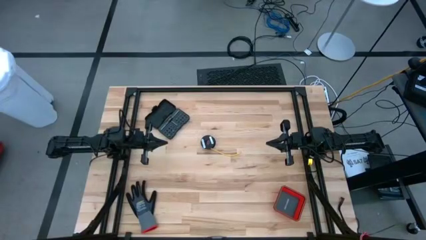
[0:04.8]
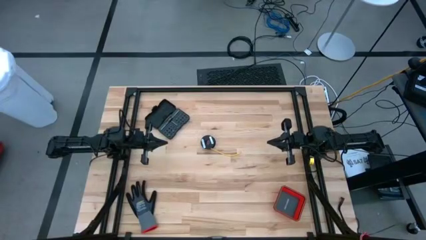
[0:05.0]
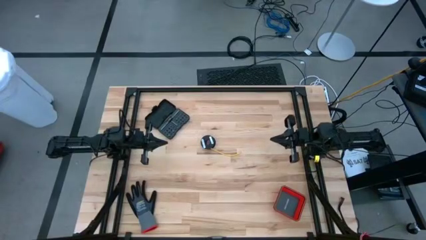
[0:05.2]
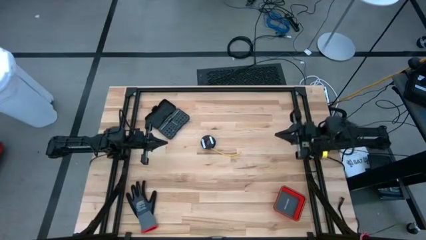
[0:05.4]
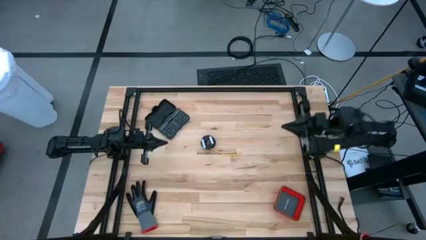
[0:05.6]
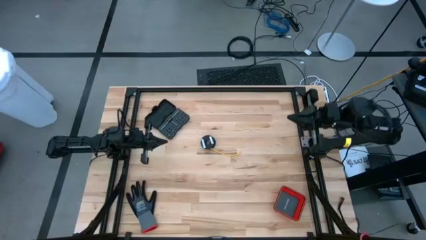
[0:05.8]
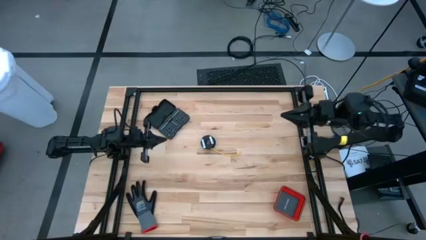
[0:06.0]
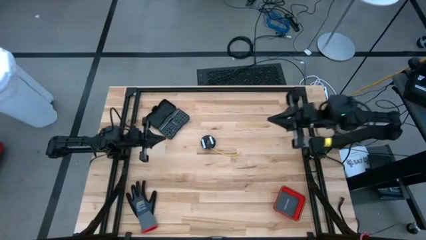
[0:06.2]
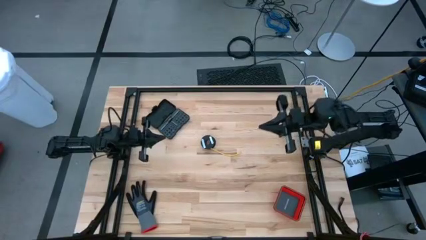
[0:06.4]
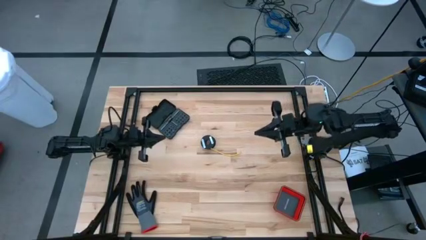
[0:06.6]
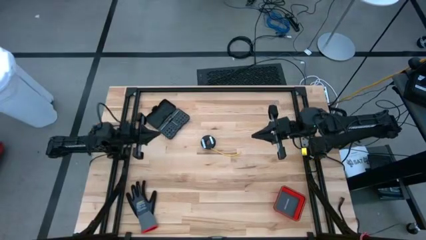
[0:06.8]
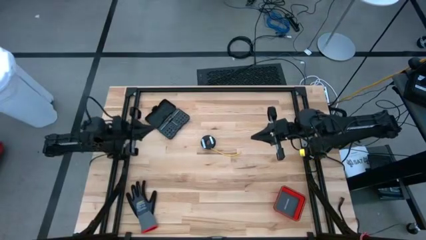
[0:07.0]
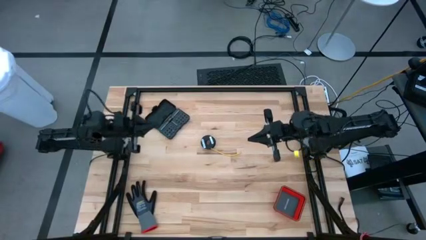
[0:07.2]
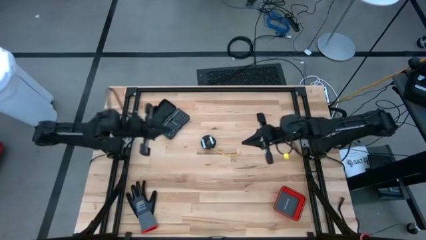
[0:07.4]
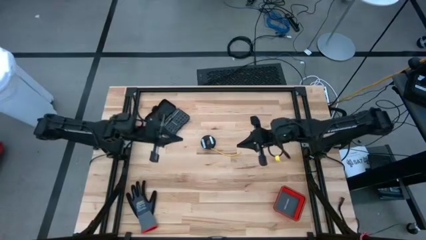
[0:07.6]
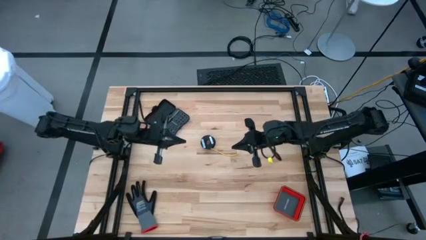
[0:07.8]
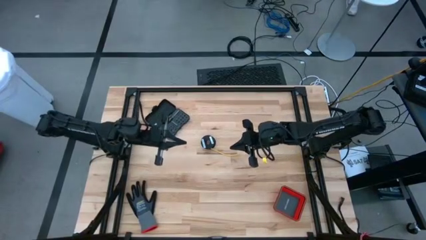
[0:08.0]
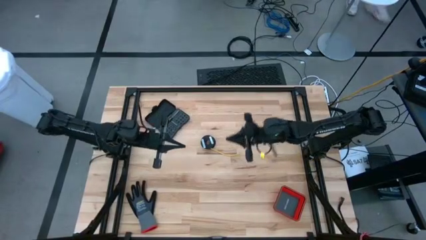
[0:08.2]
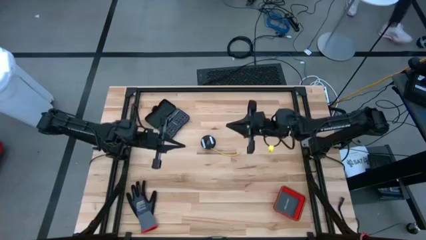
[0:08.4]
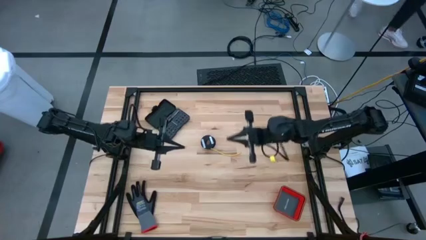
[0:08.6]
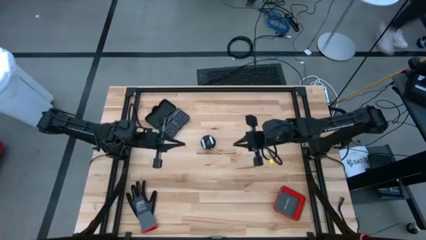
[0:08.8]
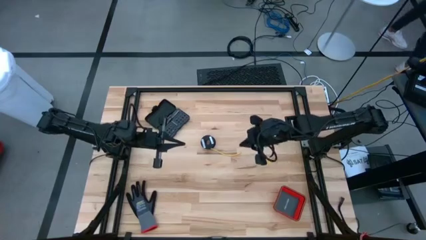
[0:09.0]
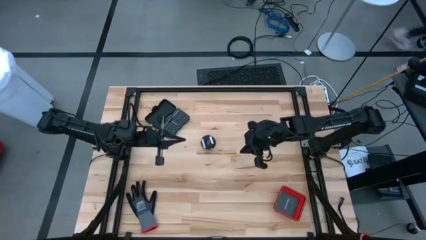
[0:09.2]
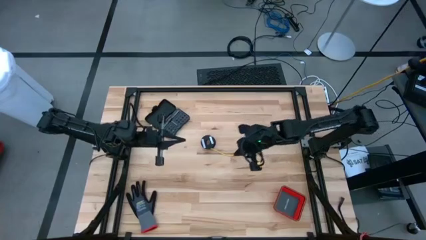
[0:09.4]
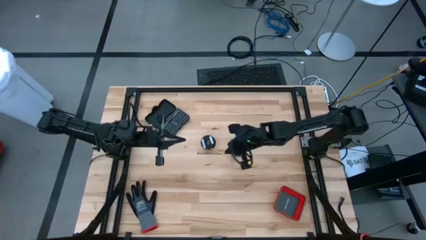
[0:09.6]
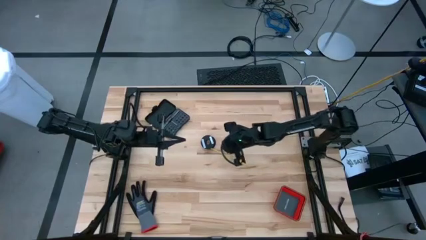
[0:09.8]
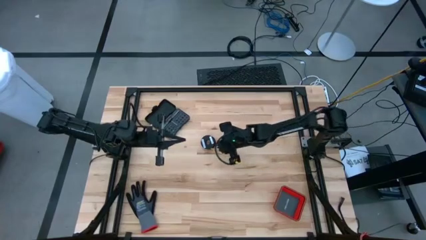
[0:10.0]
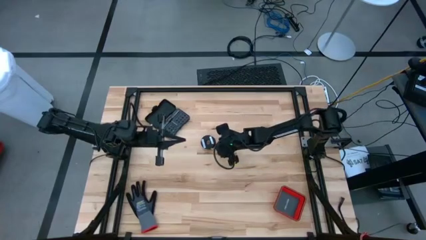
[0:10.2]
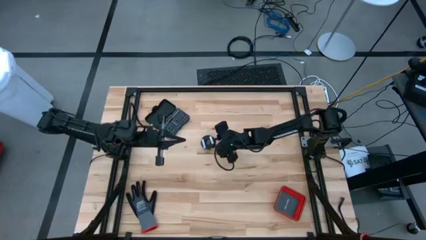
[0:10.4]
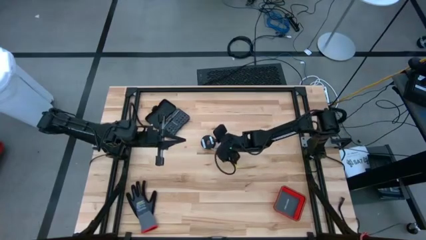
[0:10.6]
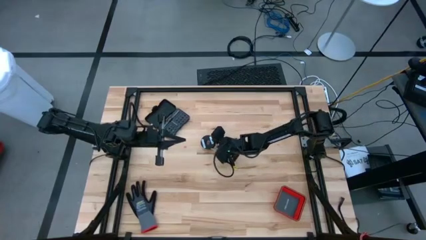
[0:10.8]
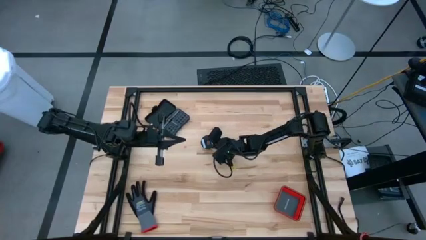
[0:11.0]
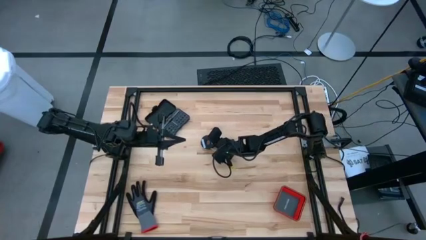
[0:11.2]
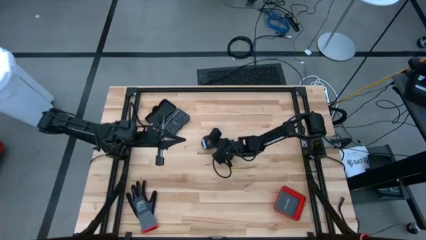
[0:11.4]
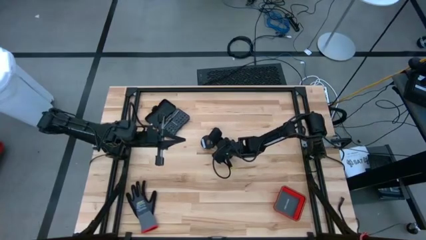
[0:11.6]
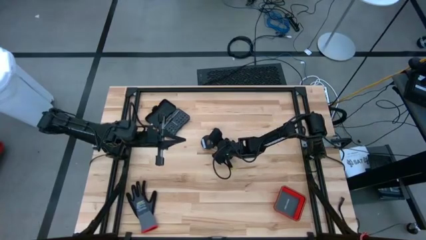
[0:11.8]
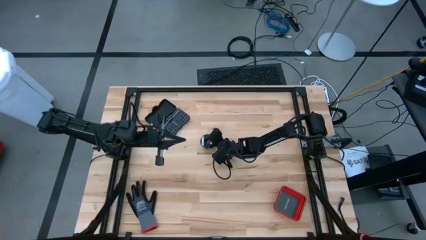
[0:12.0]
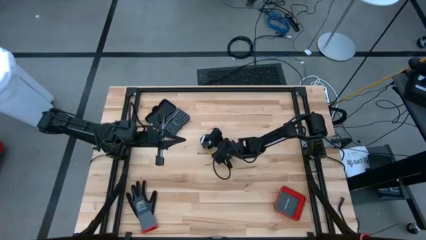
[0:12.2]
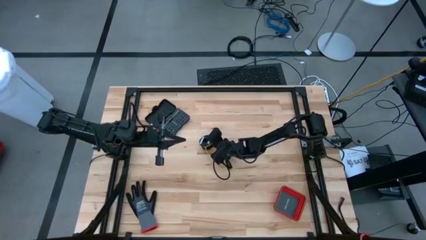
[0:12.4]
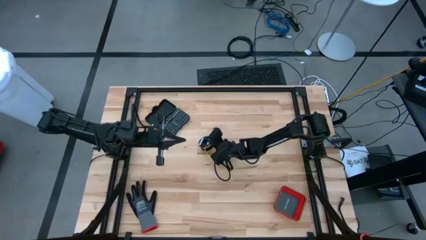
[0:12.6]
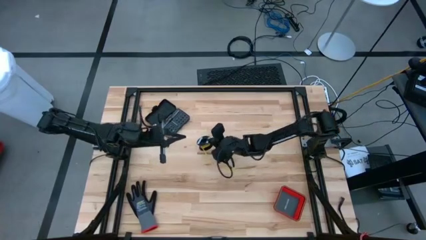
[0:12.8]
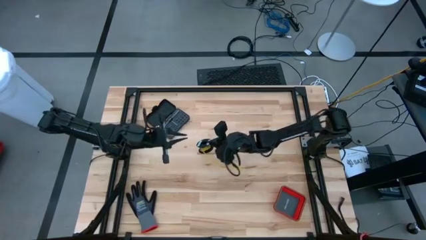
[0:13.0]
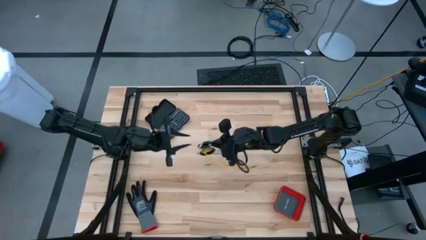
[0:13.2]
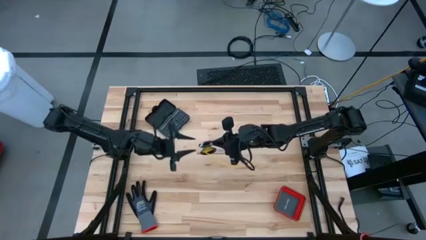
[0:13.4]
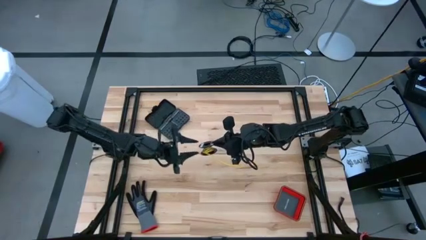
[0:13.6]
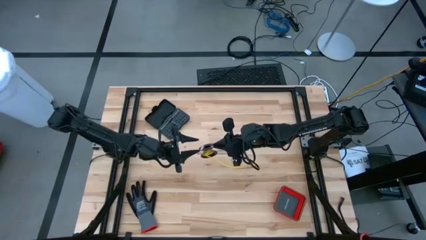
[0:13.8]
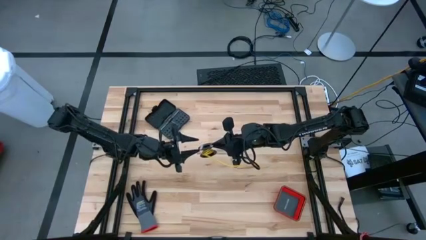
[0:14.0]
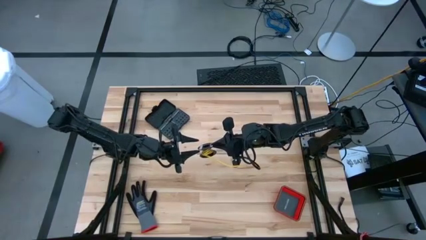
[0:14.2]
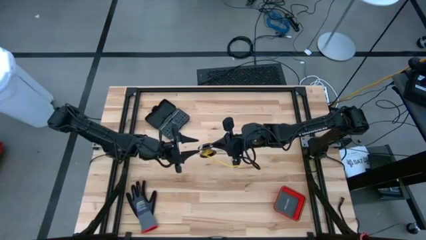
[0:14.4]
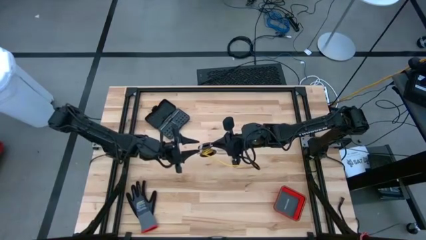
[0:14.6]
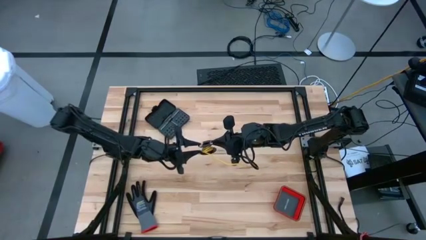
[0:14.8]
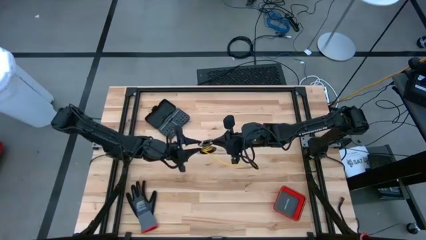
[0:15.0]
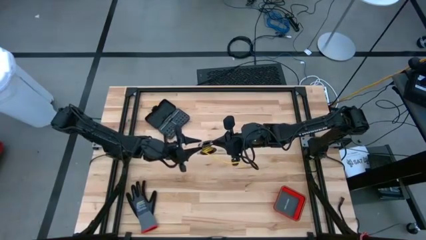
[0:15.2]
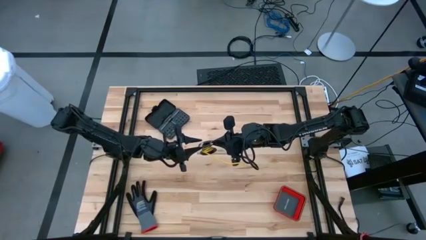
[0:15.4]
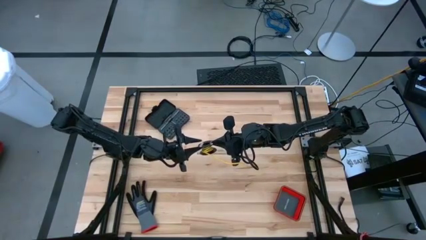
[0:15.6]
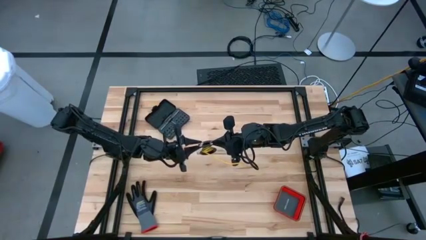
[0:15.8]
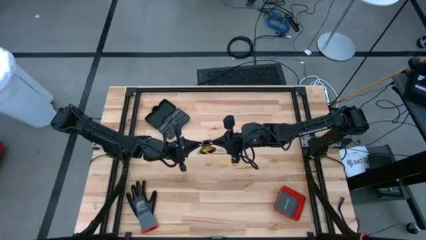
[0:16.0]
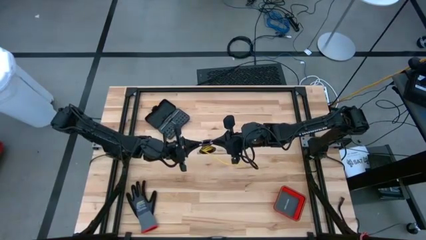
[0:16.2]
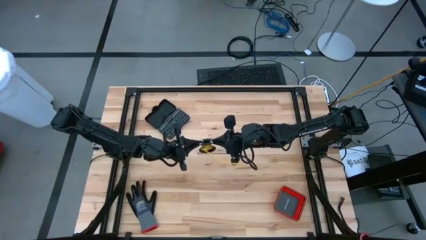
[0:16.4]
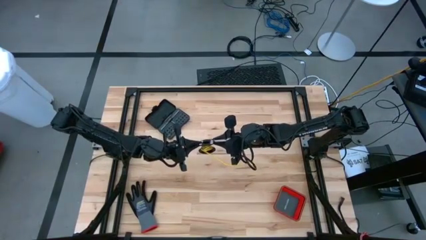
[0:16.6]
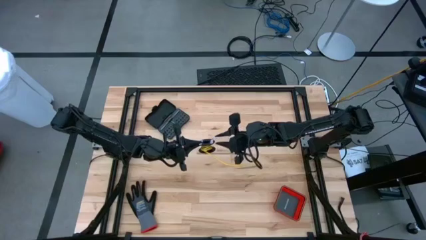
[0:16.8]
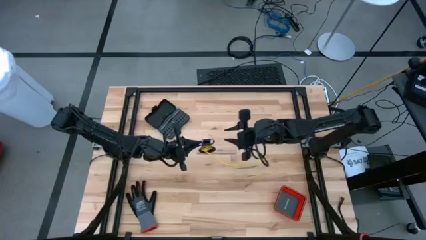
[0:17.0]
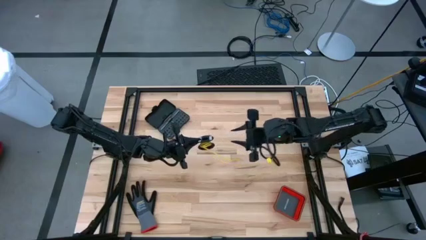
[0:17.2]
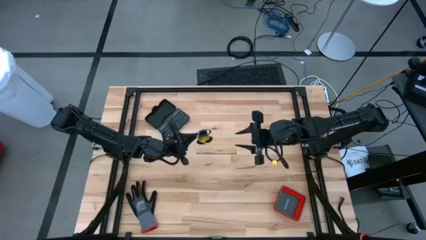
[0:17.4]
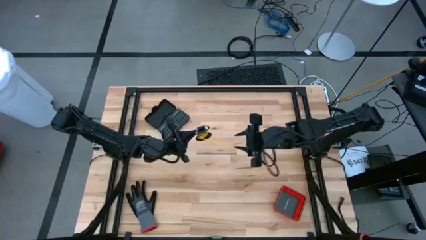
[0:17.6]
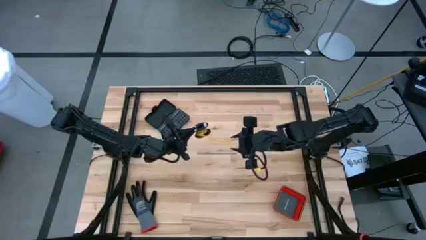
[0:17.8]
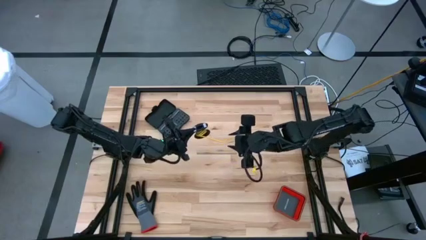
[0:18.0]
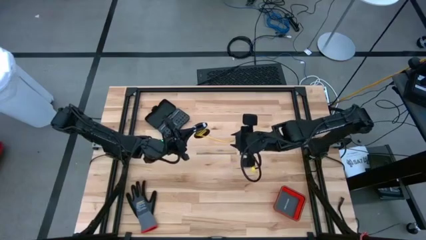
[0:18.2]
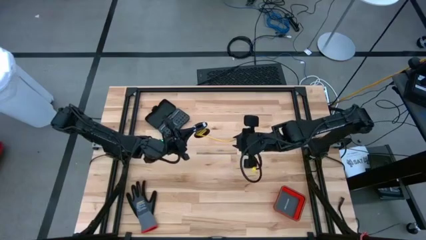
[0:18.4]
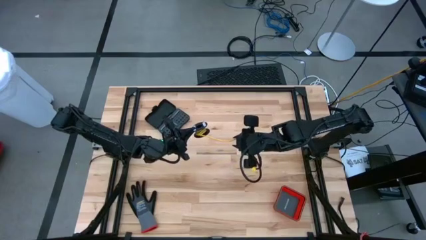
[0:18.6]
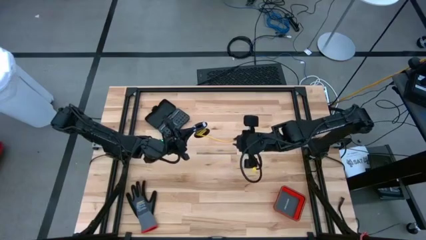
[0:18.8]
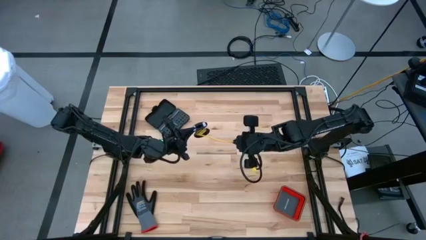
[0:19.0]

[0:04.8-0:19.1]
Task: Coil cords
Uncoil the yellow wire from the spool
